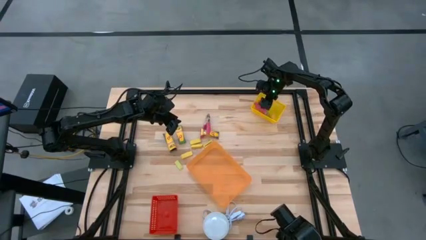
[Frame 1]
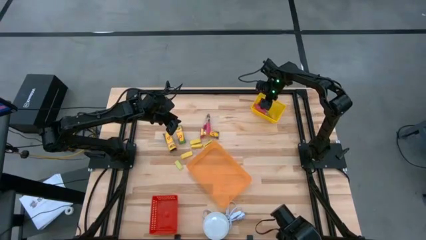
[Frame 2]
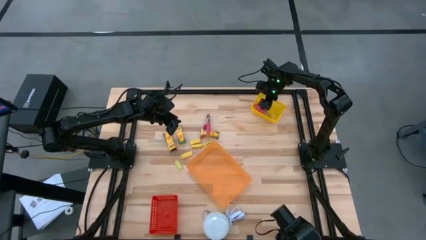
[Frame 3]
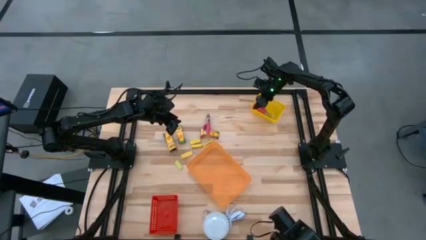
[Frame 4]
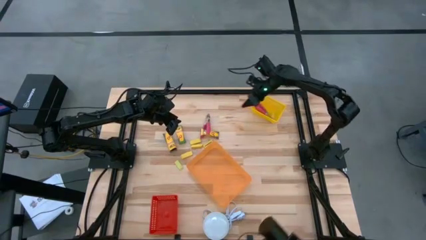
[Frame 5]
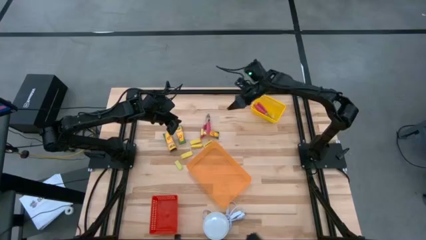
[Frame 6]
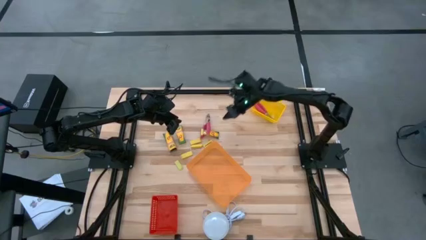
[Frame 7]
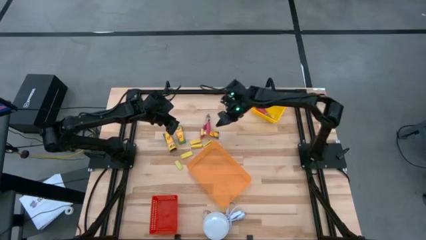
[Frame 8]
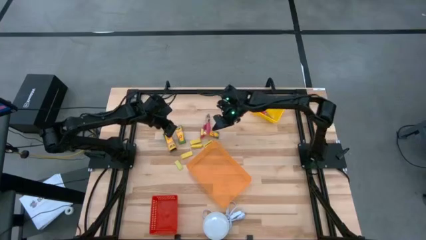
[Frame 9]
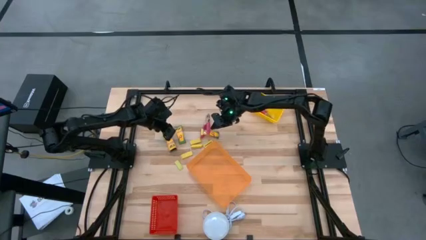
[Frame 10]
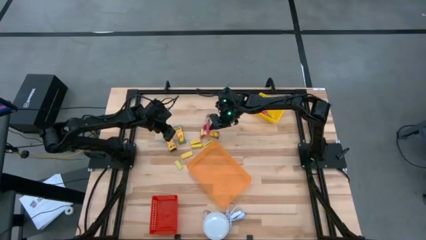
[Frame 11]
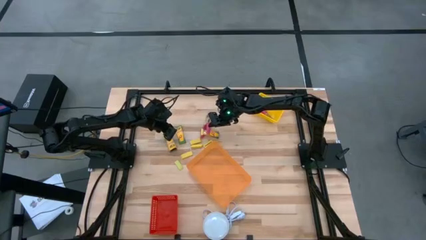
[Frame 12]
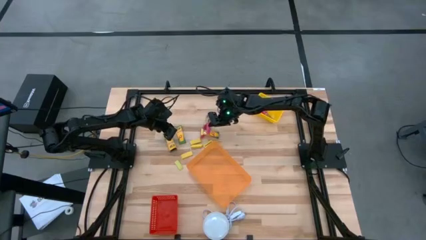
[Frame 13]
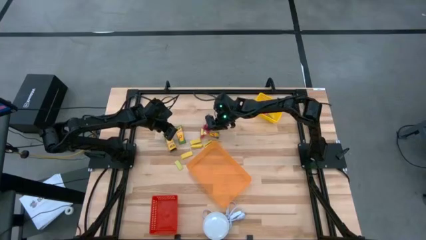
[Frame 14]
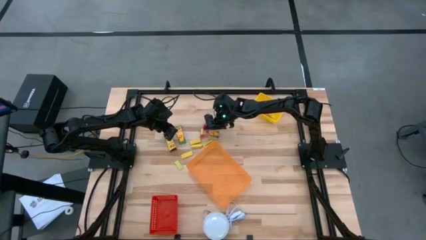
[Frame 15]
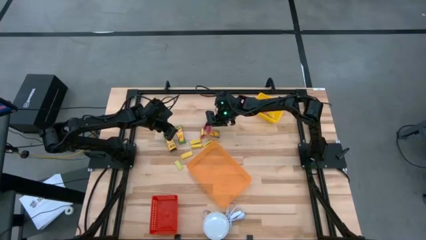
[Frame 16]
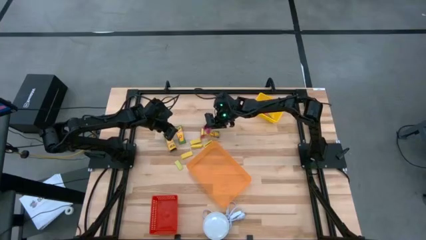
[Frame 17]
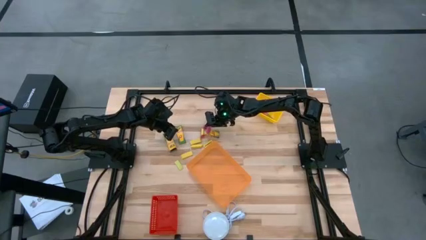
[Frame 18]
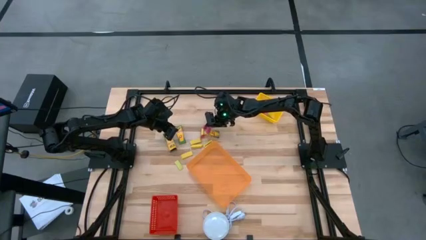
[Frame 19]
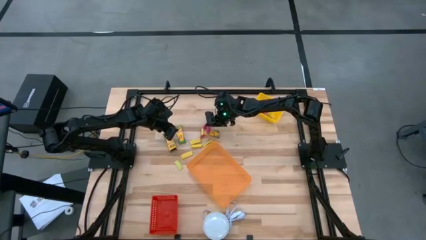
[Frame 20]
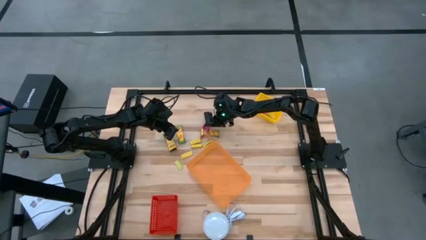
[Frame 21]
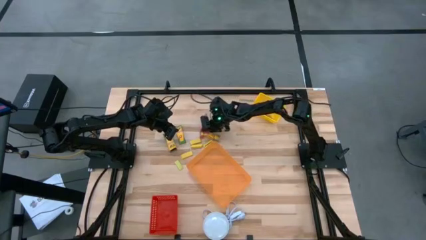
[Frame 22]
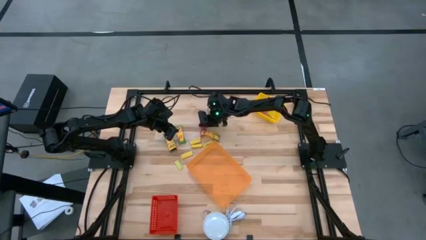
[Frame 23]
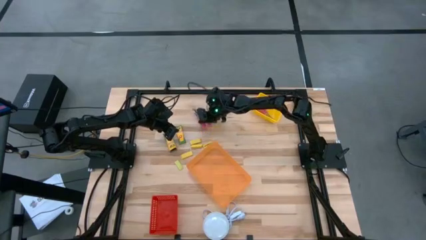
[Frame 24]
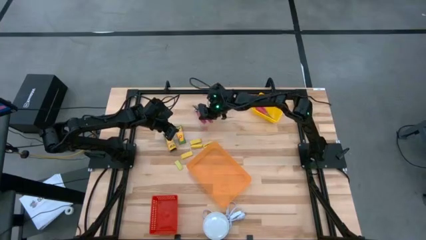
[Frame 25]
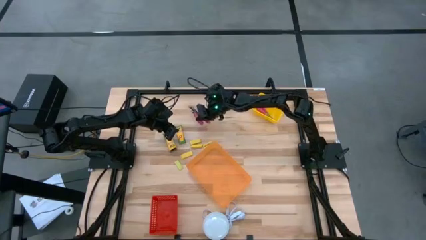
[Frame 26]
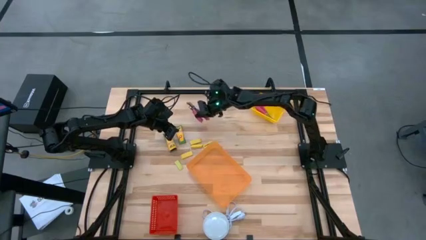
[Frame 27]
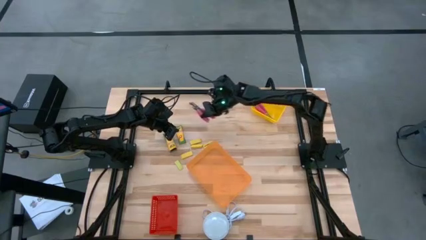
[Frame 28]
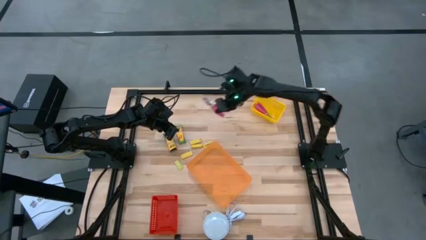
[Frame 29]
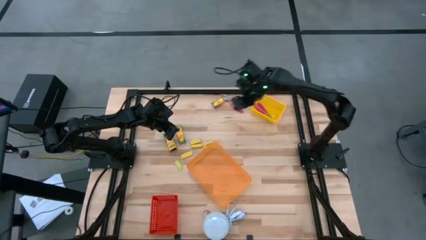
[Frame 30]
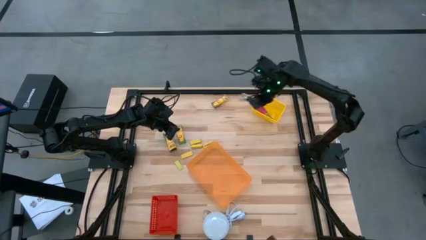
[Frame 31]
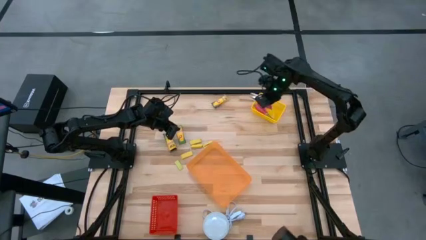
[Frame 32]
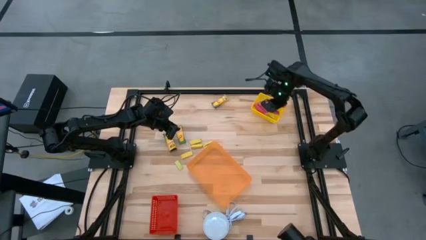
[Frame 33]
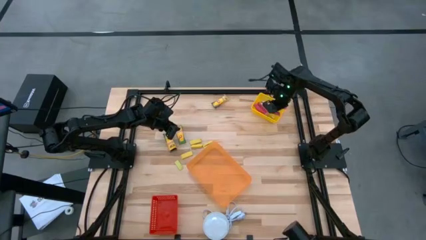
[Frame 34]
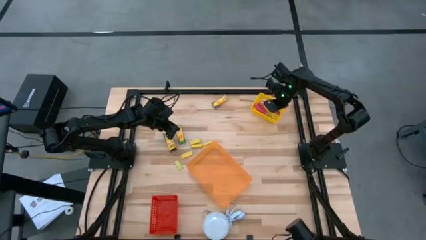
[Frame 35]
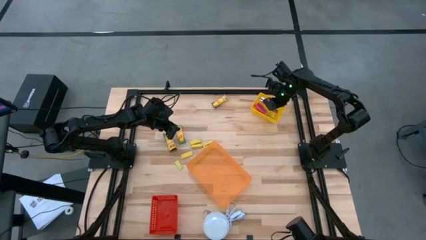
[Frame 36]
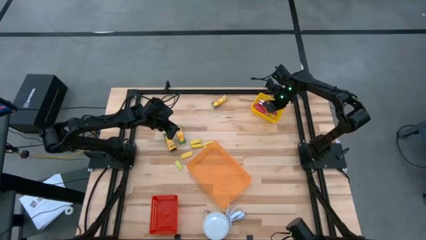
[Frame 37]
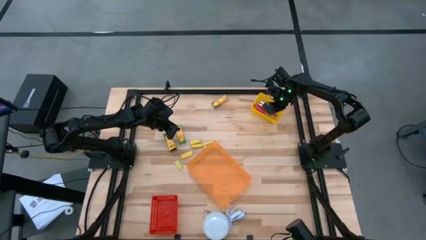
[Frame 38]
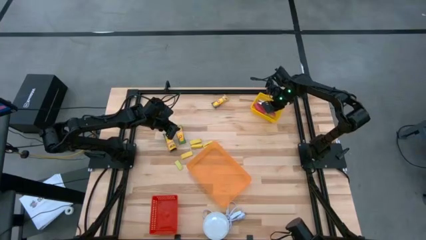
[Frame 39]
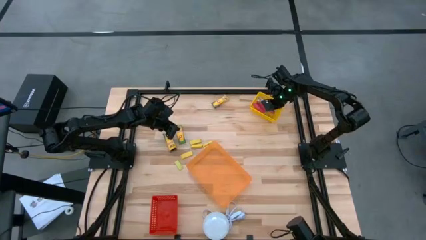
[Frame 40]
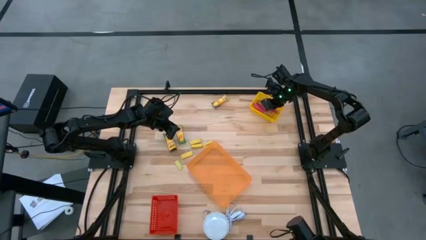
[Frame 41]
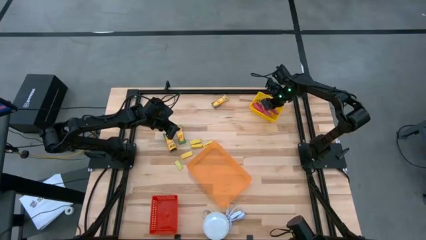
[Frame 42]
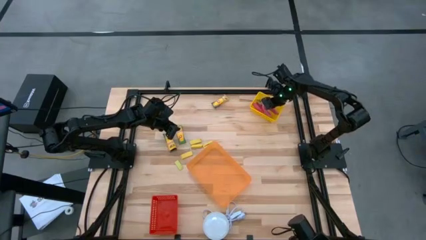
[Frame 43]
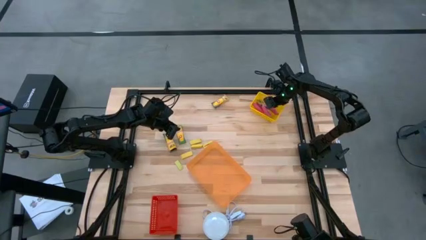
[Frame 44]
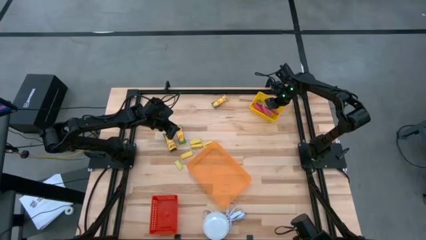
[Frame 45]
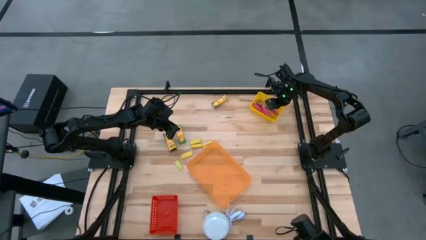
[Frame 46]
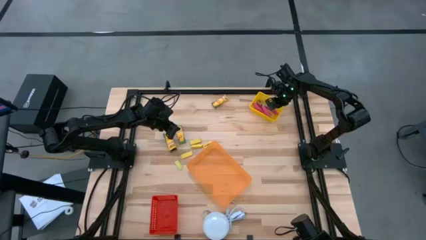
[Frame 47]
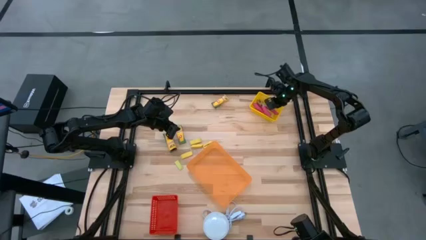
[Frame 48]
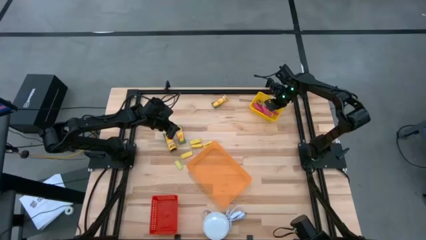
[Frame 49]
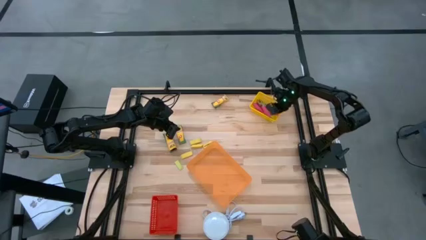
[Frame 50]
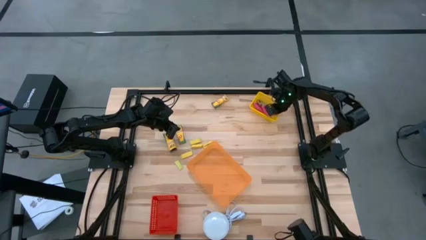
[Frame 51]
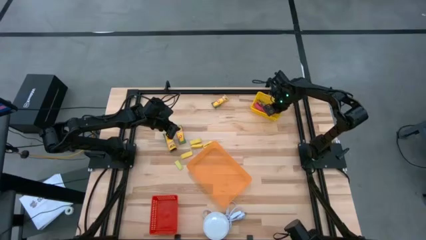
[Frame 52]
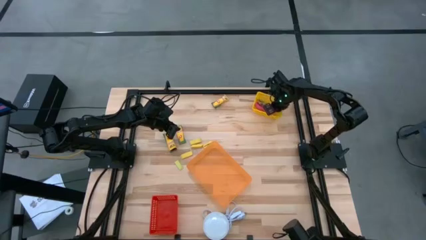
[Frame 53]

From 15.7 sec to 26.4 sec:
Task: Pick & Place School Supplies
Put the pink puncher into the yellow bin
